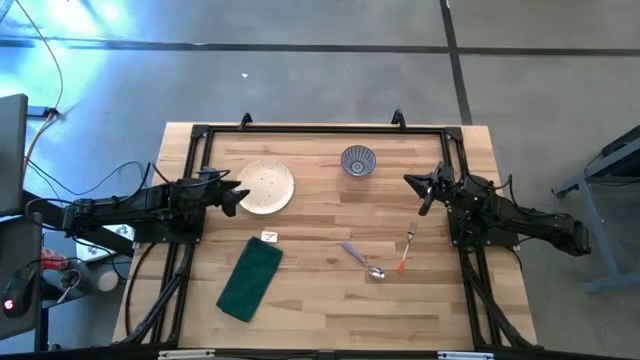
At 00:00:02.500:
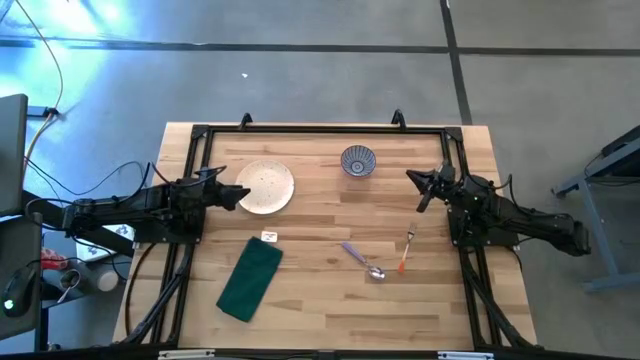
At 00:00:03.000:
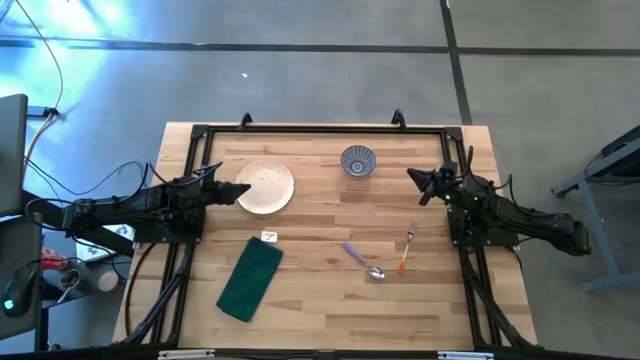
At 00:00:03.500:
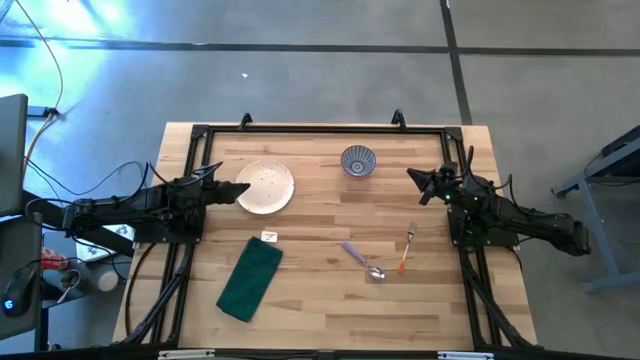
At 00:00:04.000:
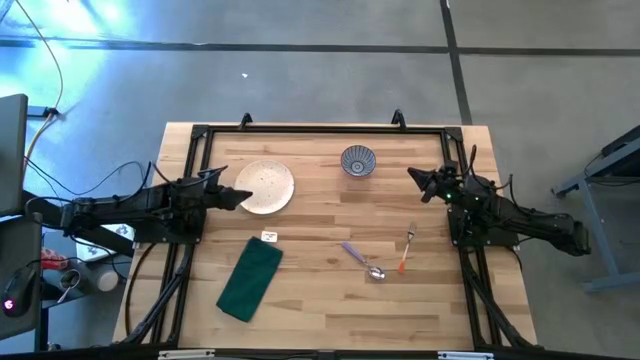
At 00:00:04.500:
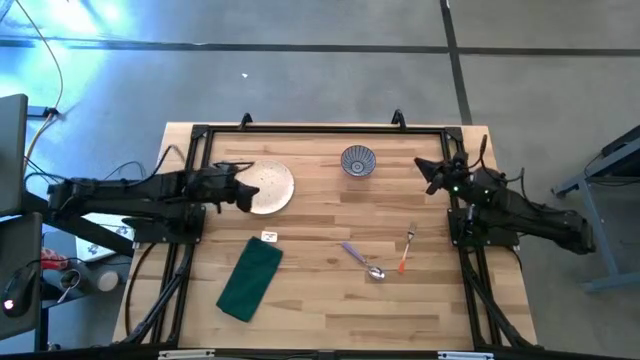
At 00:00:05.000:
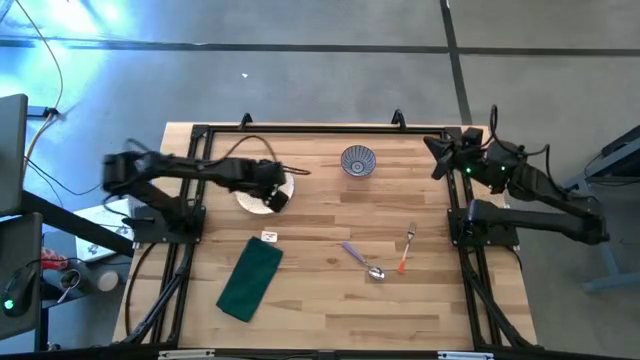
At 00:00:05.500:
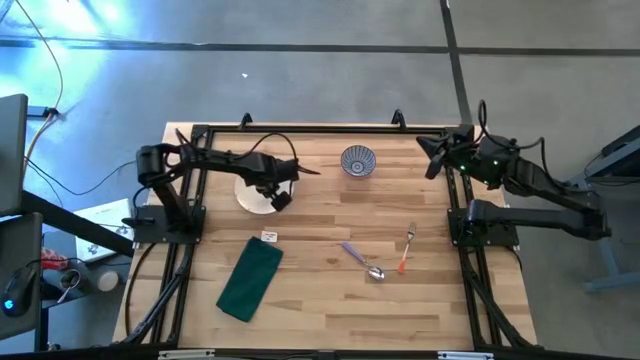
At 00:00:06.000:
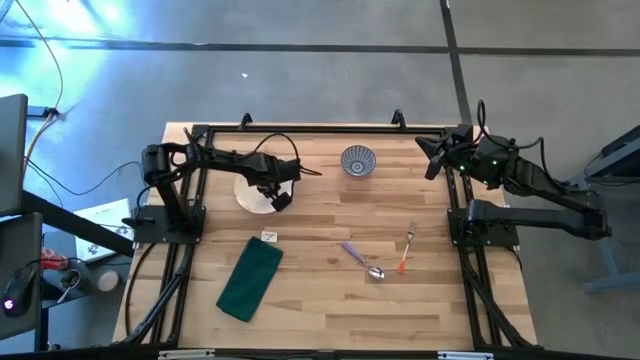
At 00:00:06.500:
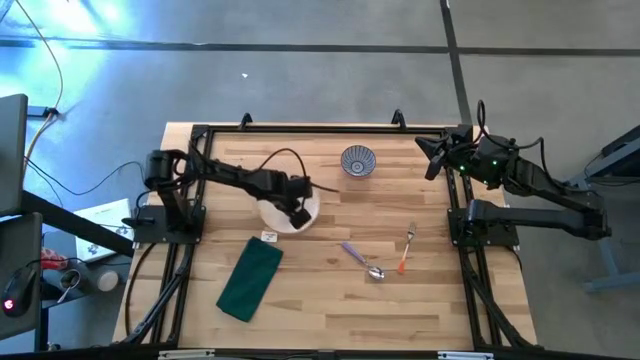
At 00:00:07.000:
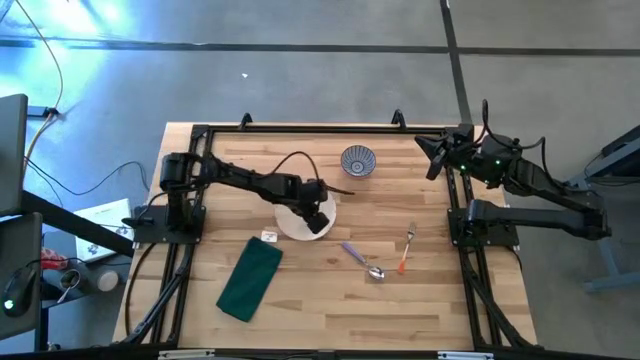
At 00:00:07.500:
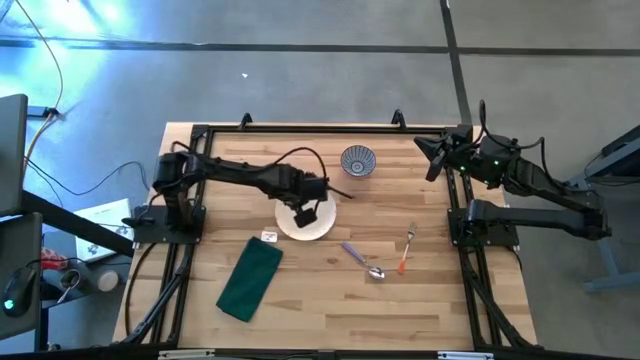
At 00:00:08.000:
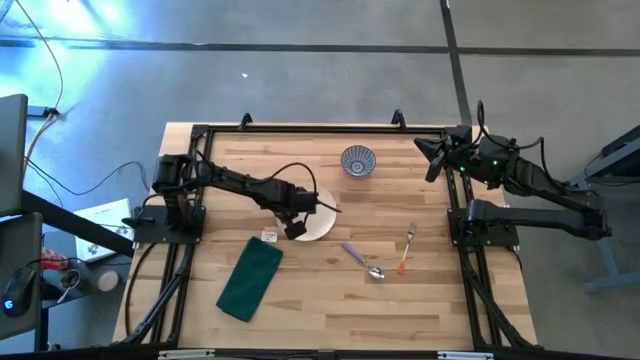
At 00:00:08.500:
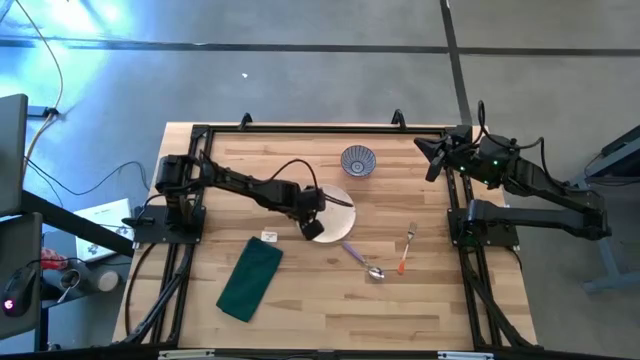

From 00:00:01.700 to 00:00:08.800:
Task: Set table place
Move the white plate to the center of the table

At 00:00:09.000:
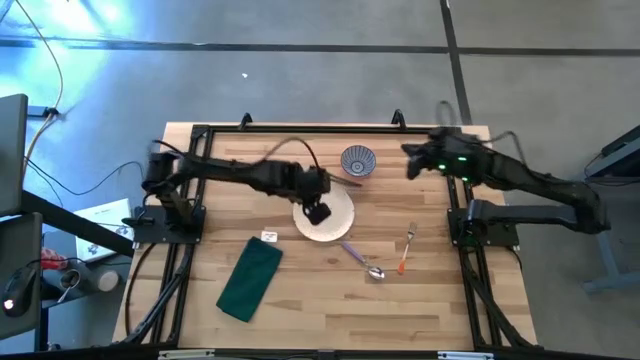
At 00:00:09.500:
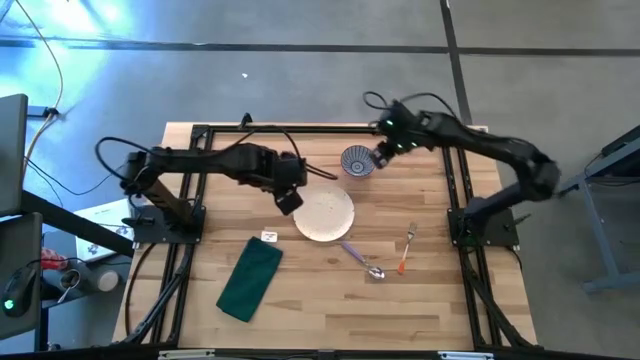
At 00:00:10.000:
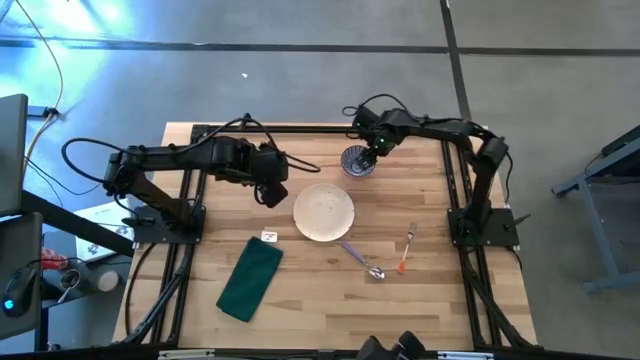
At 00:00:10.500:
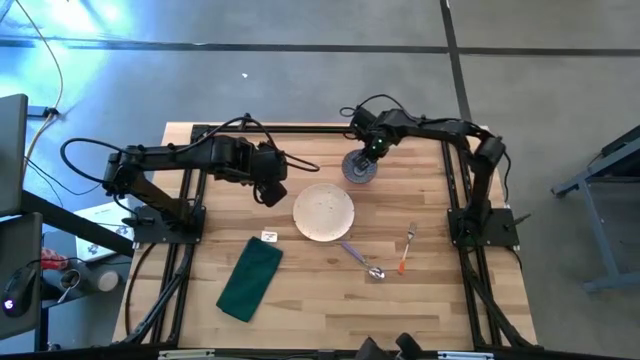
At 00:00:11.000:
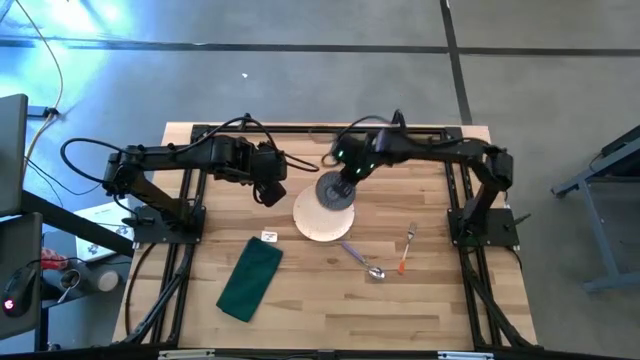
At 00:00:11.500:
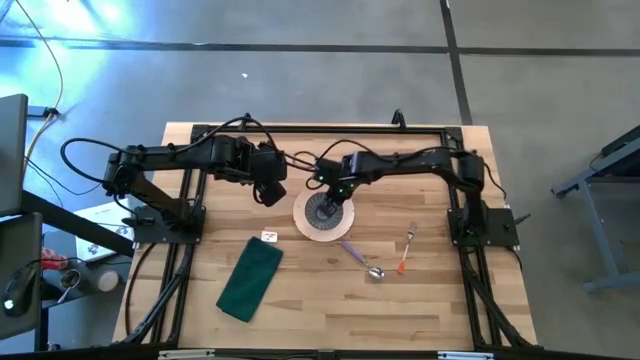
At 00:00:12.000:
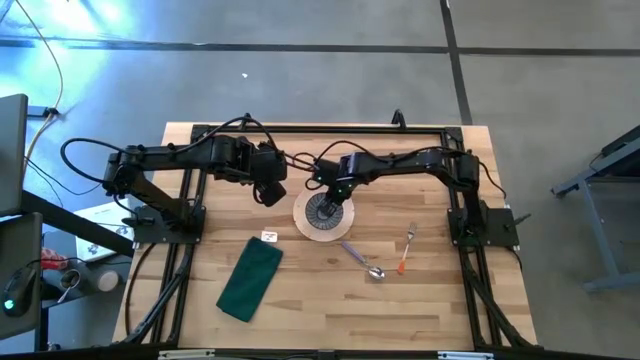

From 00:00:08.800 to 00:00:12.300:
Stack the stripe red bowl on the white plate

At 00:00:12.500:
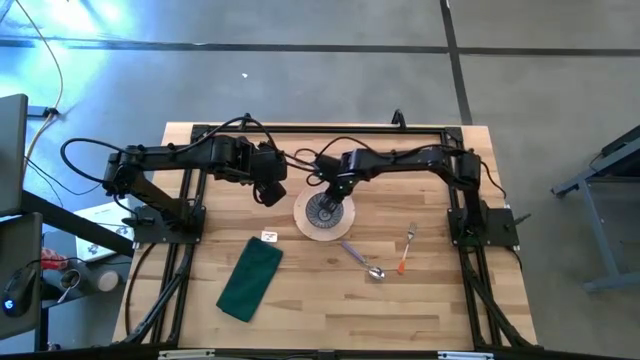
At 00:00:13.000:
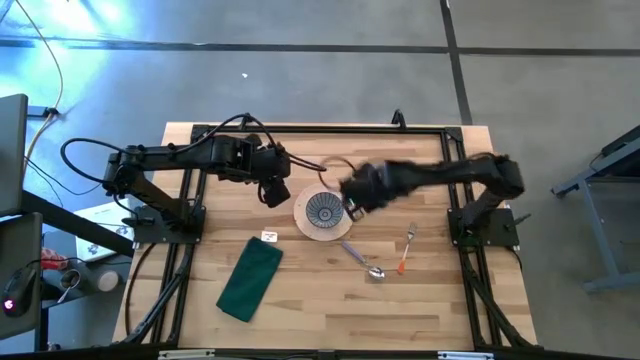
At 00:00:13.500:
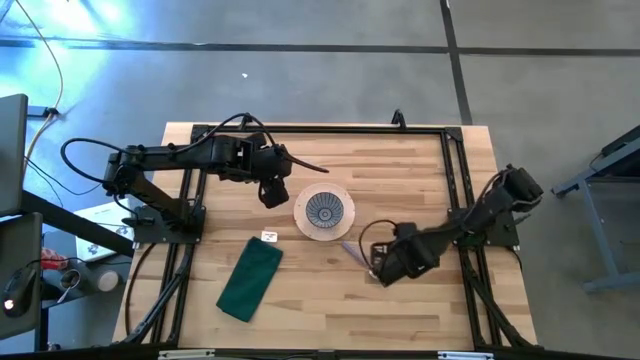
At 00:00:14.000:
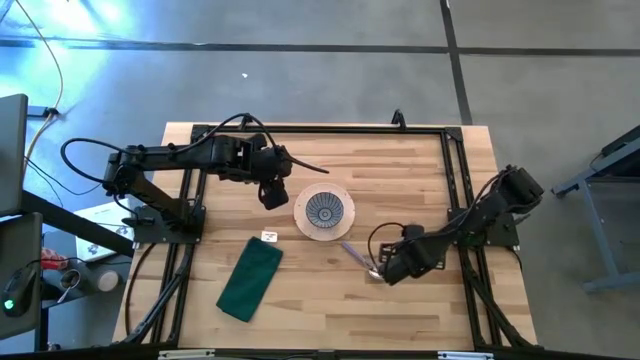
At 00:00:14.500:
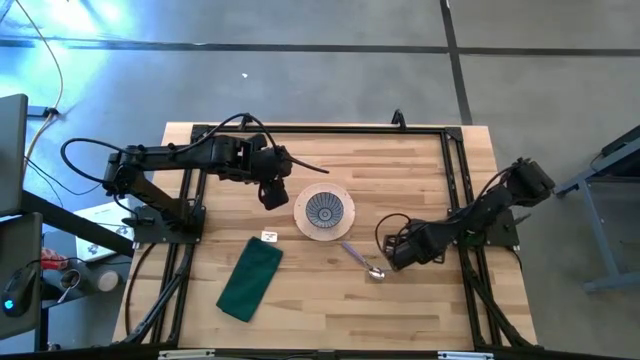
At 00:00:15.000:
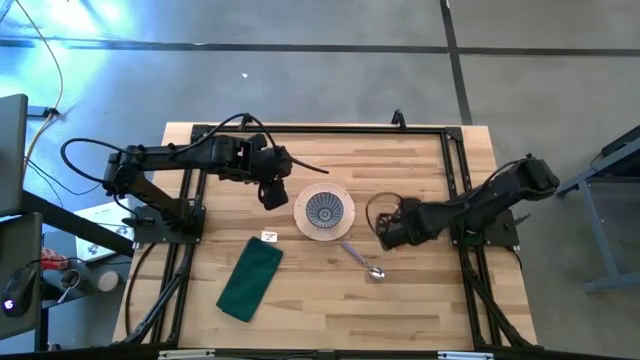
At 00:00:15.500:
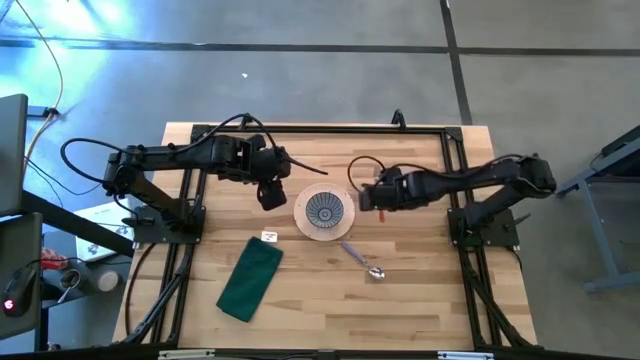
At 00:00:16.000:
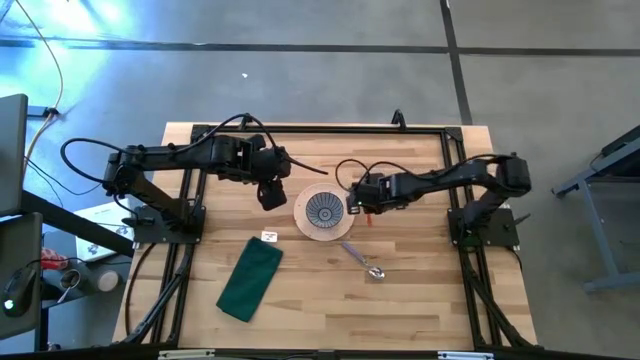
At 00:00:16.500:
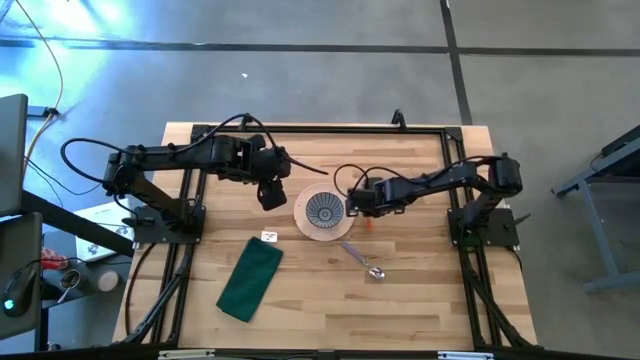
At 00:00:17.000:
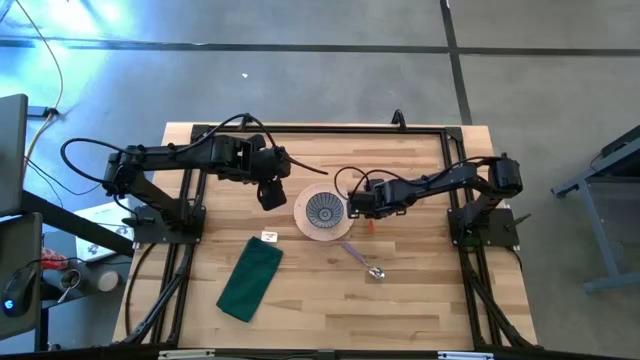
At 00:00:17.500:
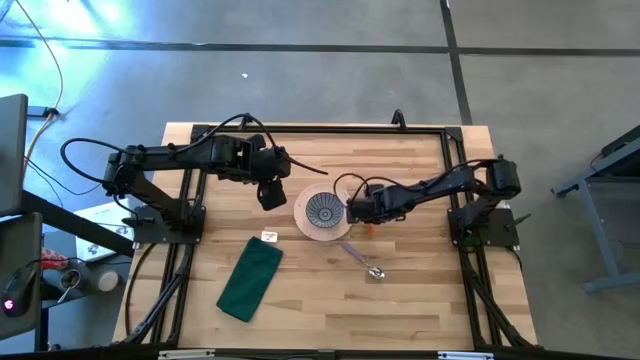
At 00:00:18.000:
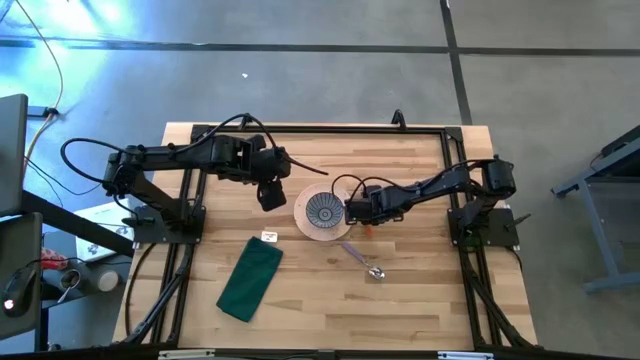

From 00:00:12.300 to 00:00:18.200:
Put the fork to the right of the white plate on the table

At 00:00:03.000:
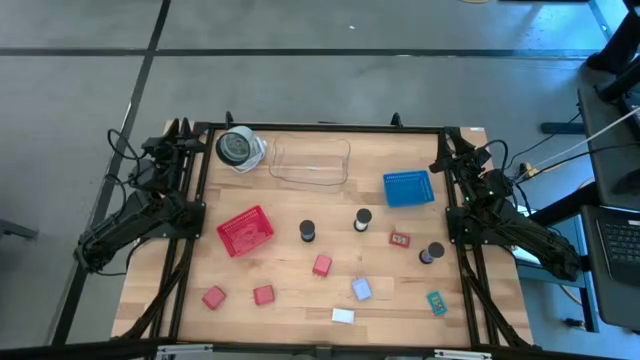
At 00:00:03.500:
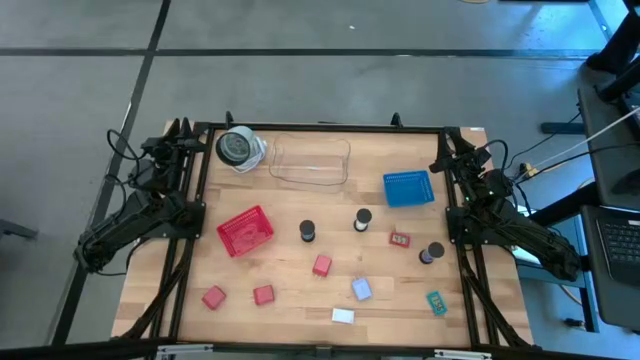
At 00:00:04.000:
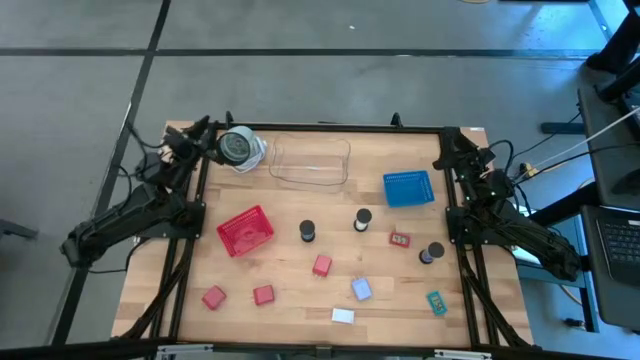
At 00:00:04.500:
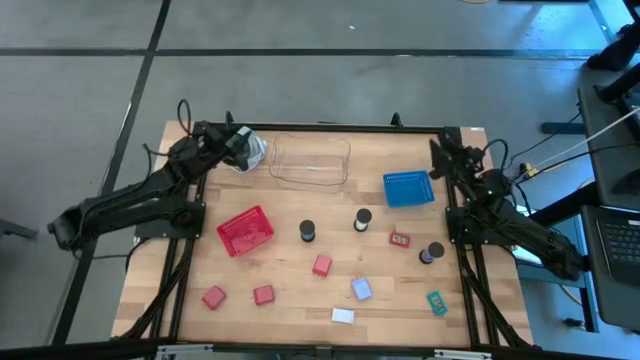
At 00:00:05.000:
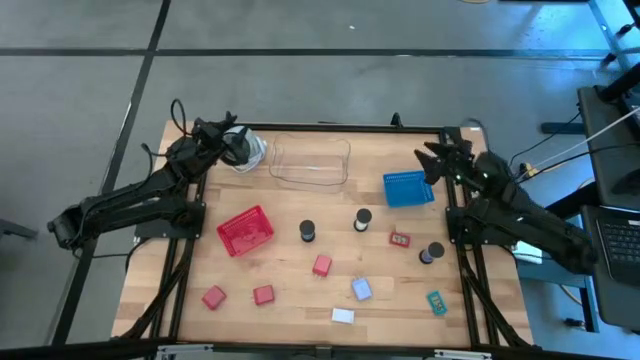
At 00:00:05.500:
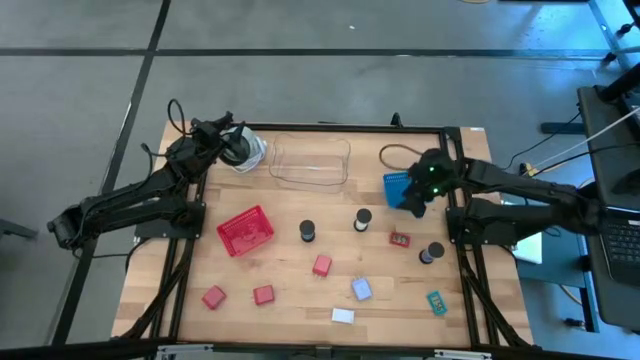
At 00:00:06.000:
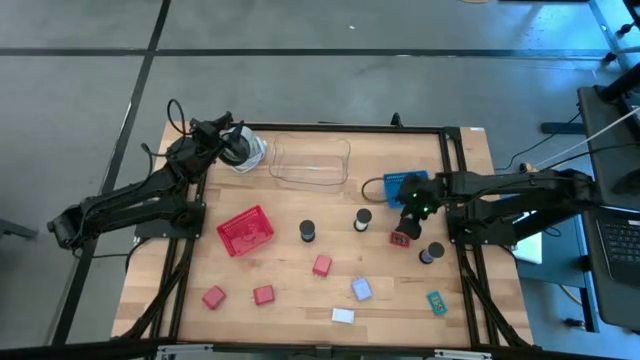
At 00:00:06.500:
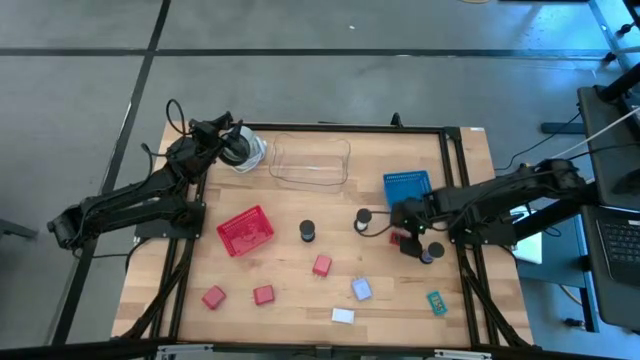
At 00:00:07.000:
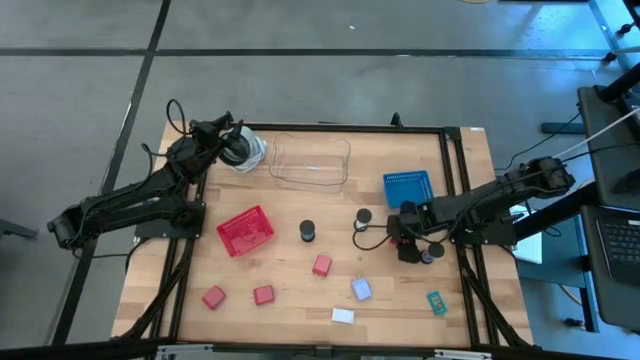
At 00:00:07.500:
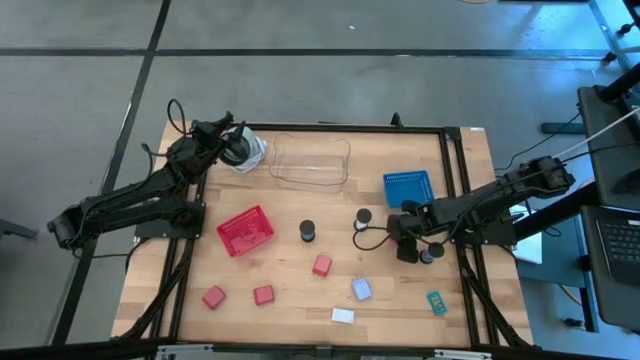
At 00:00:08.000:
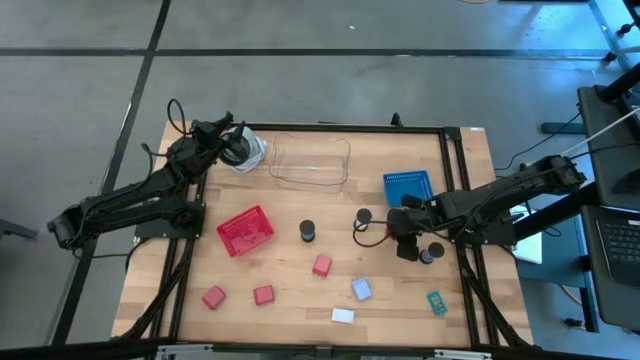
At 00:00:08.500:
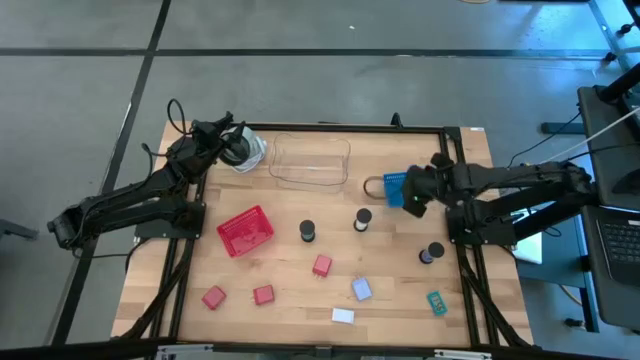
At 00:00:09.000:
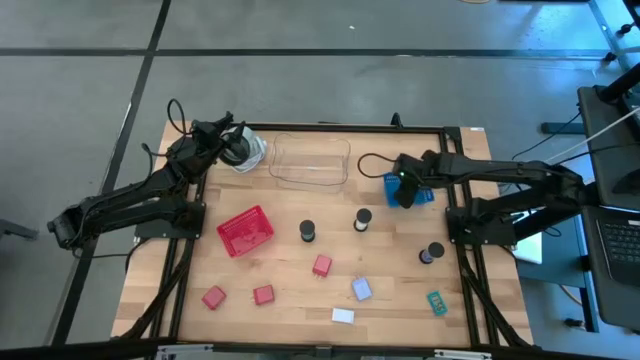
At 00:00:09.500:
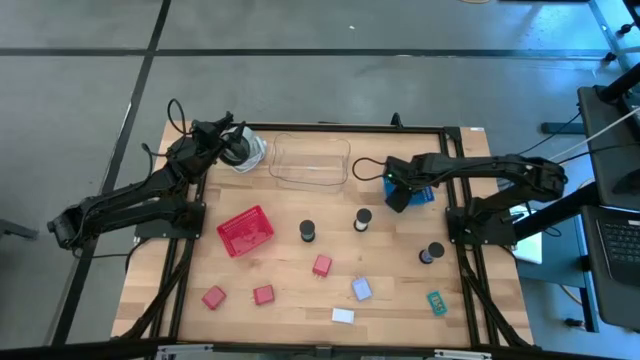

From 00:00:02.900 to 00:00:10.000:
Task: Pick & Place Office items
Put the red digital timer into the blue bin
